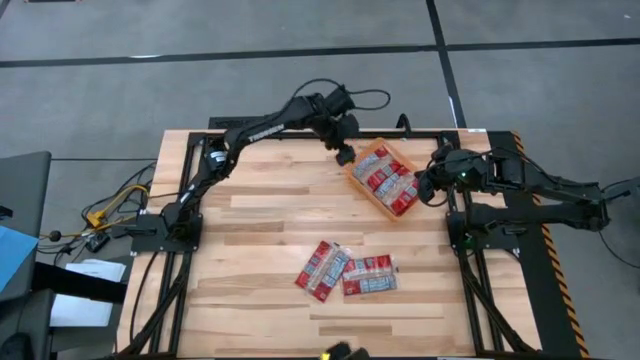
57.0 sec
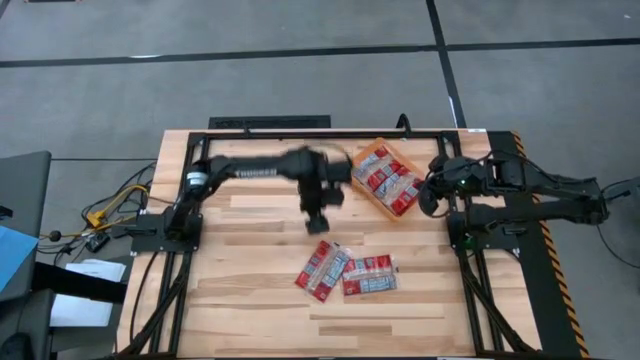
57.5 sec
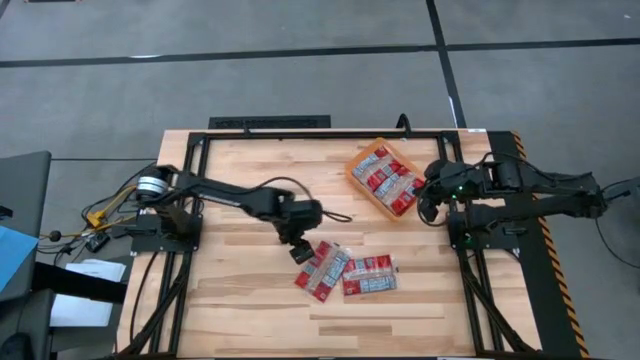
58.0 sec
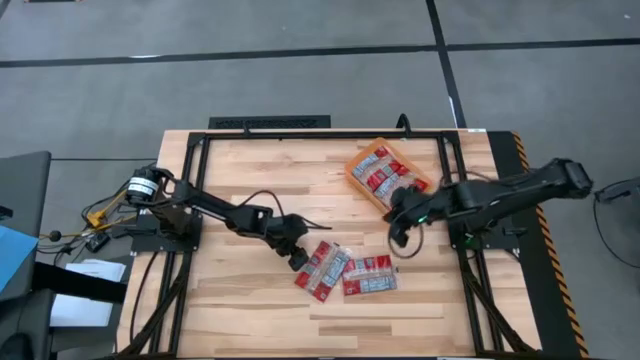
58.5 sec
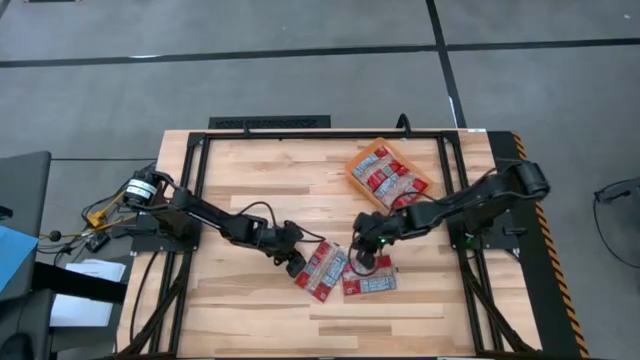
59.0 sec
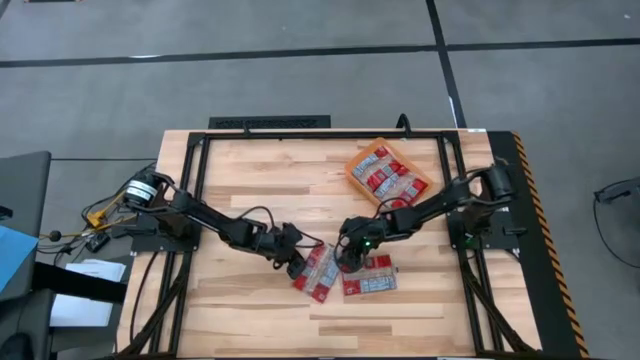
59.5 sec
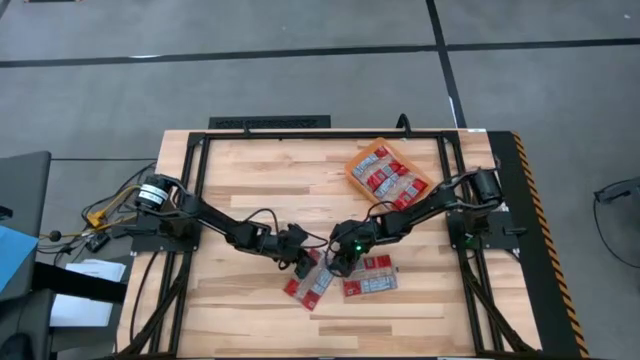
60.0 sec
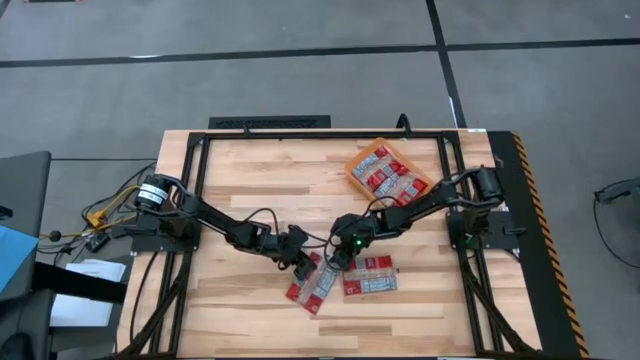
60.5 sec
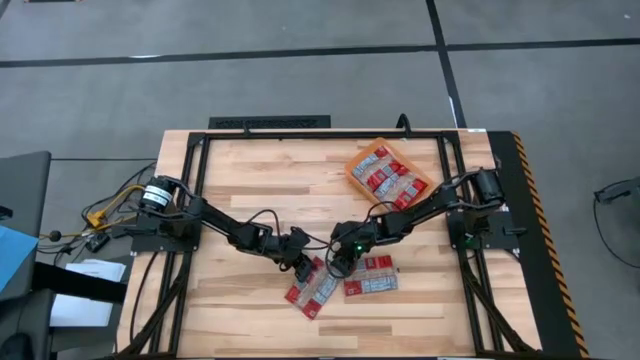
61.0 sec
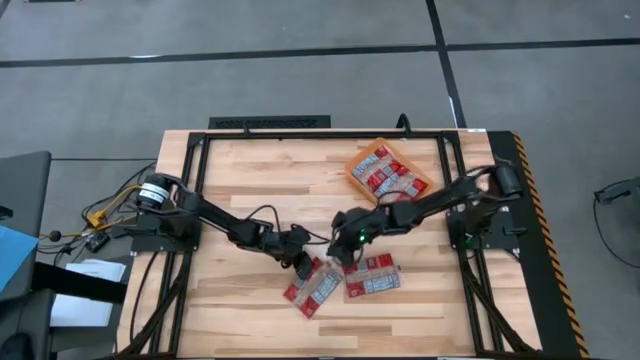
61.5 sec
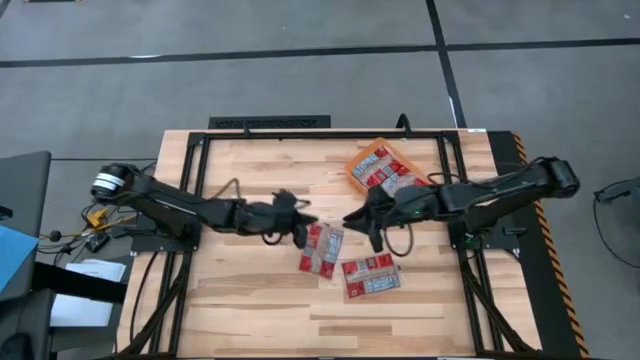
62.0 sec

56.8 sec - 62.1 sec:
Task: Sort popcorn bags into baskets
Put the popcorn bag into the orange transparent bin

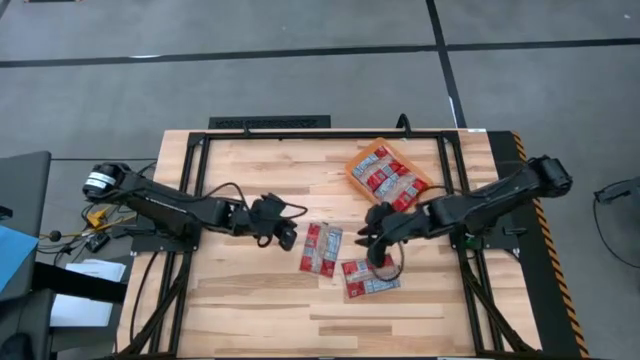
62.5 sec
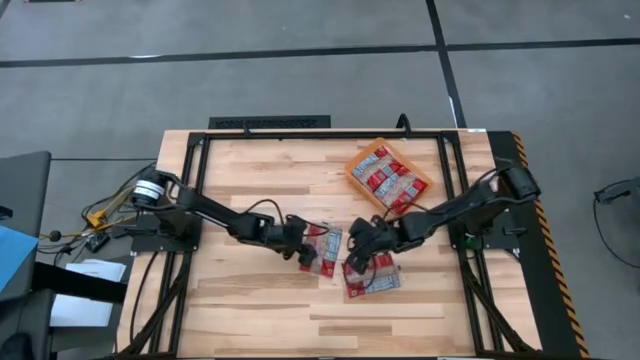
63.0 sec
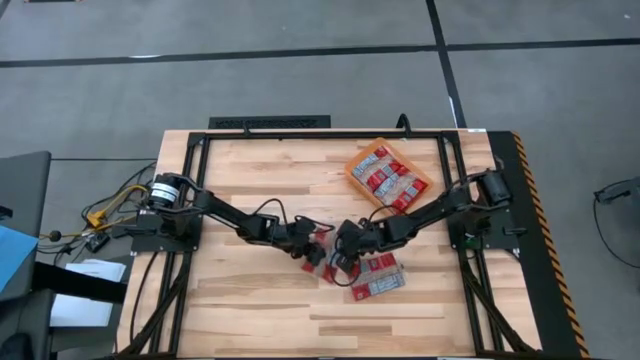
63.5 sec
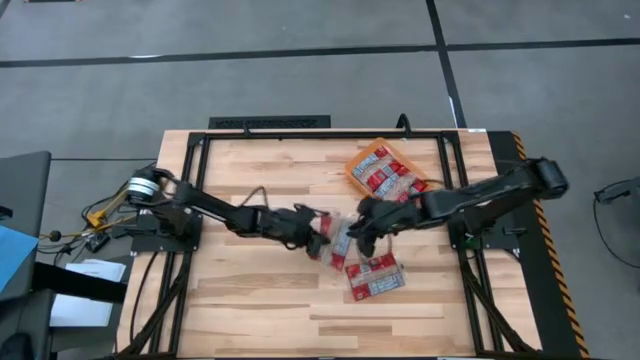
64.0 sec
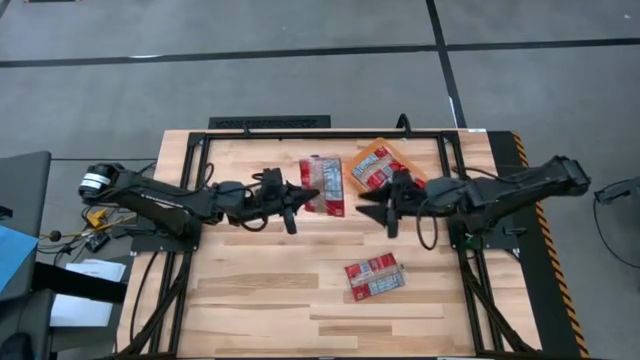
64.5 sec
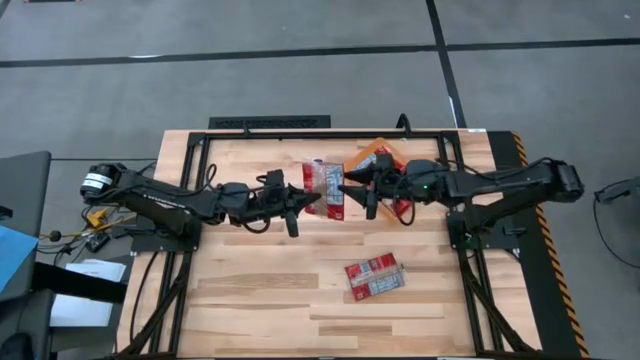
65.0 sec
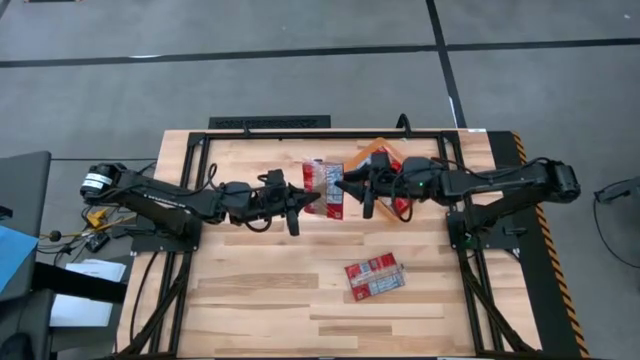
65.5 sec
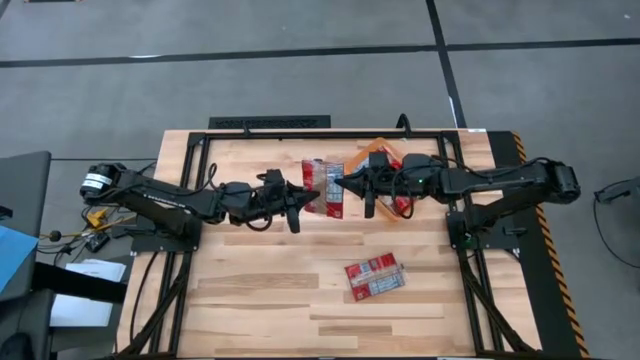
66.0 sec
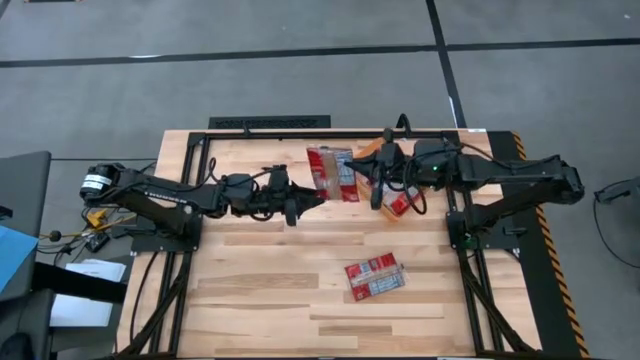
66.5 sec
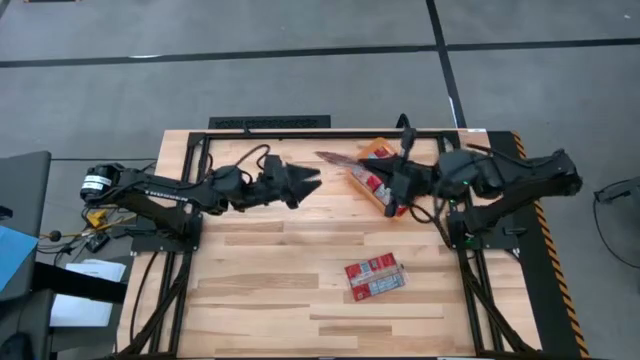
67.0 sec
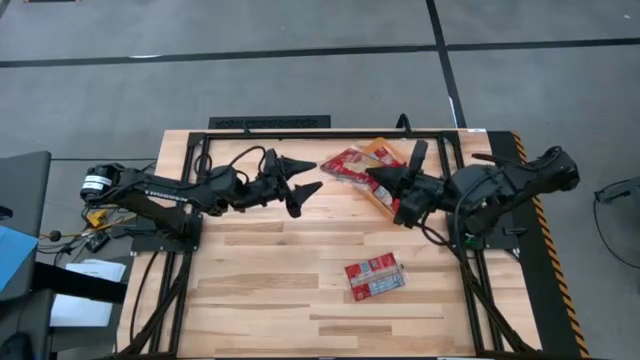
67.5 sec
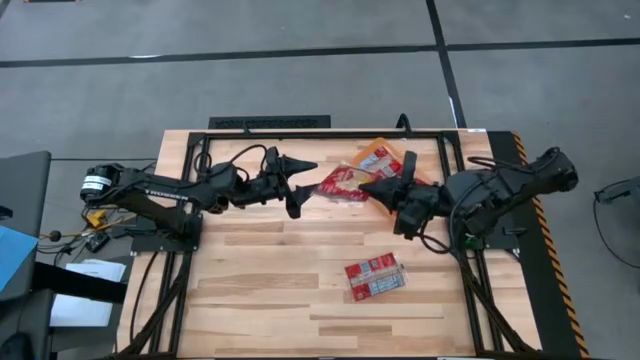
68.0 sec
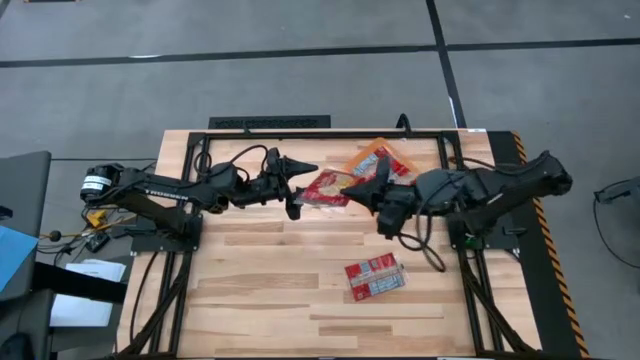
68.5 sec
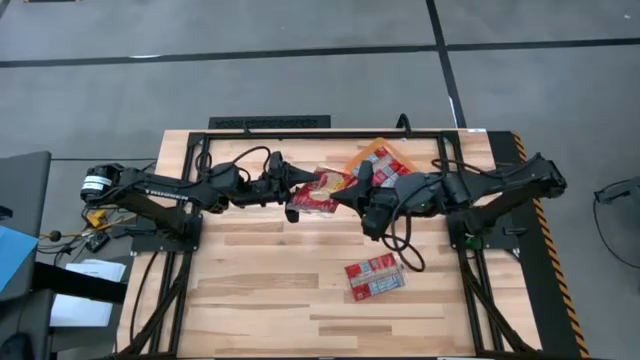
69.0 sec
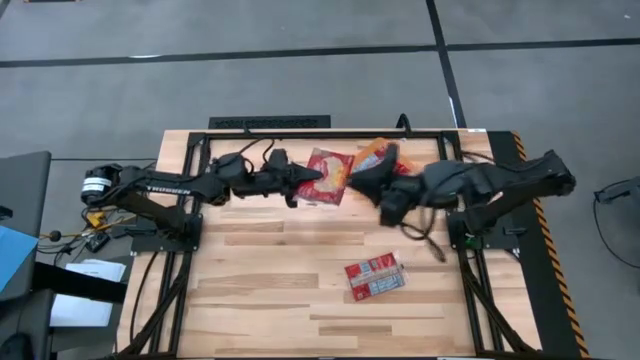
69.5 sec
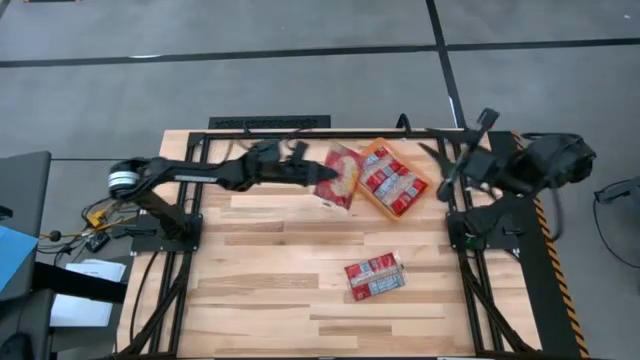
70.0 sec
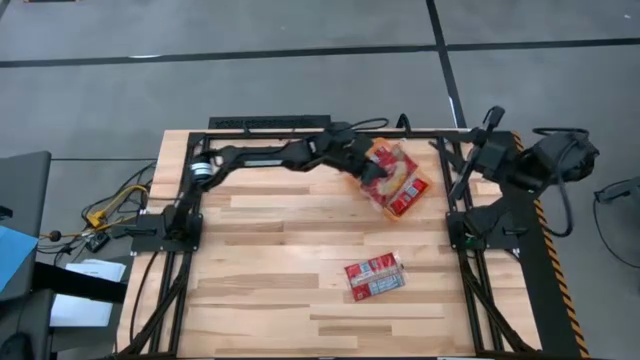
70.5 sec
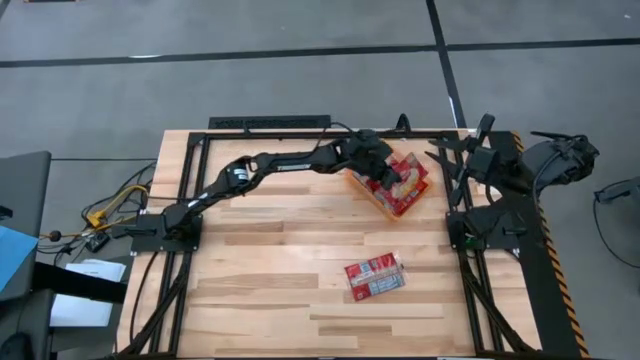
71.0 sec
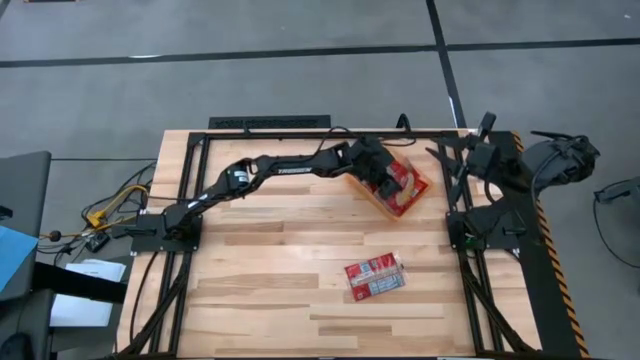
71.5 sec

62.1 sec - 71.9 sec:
Put the popcorn bag into the orange transparent bin

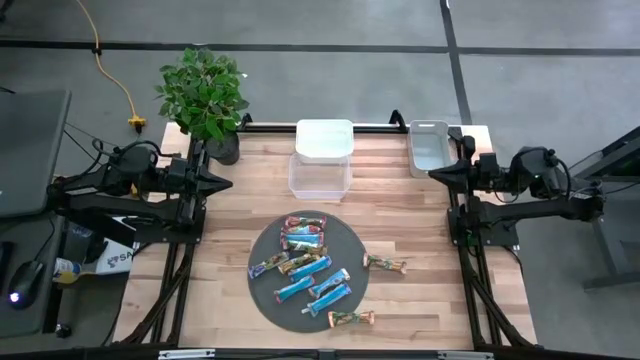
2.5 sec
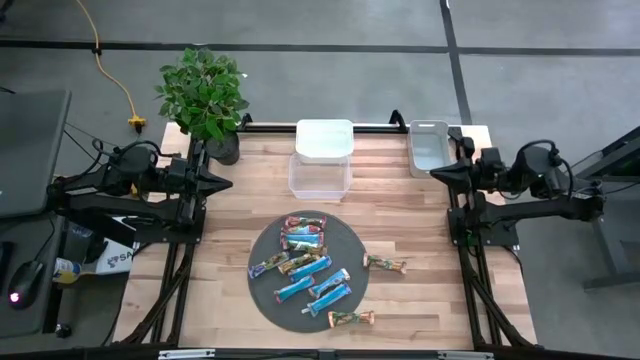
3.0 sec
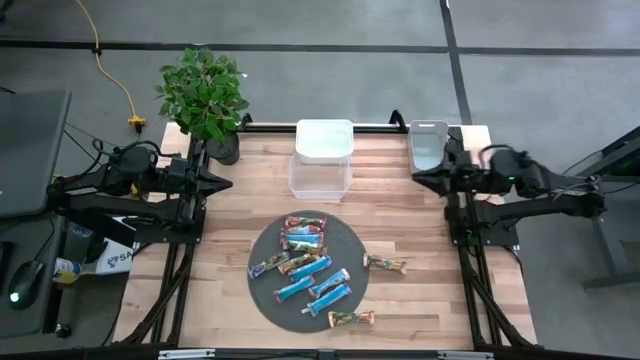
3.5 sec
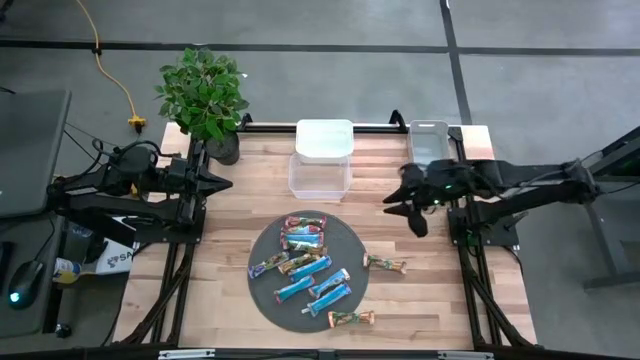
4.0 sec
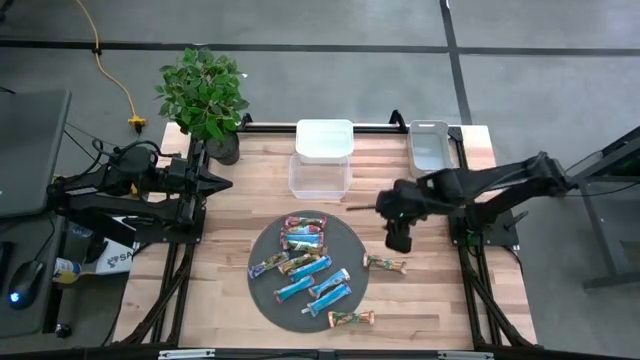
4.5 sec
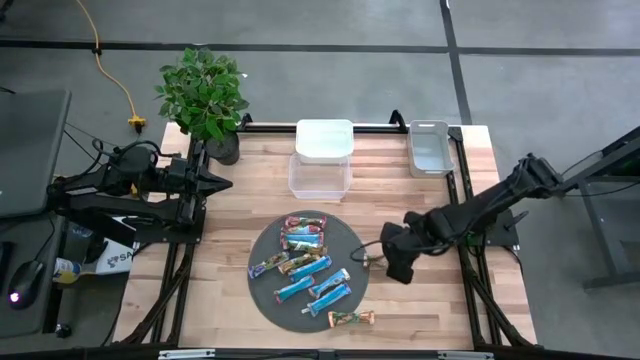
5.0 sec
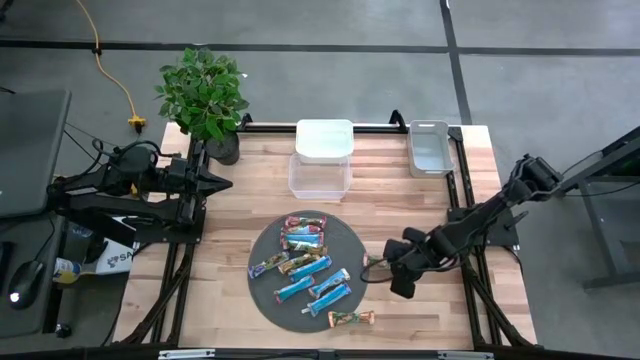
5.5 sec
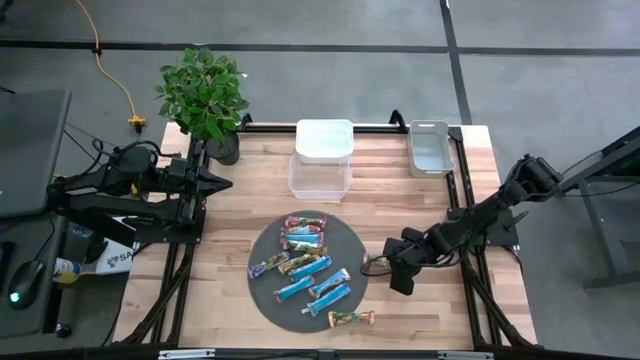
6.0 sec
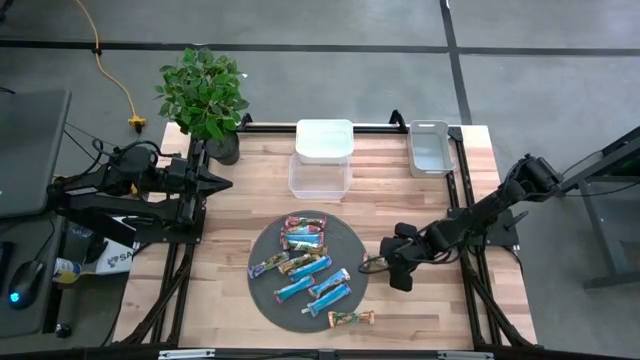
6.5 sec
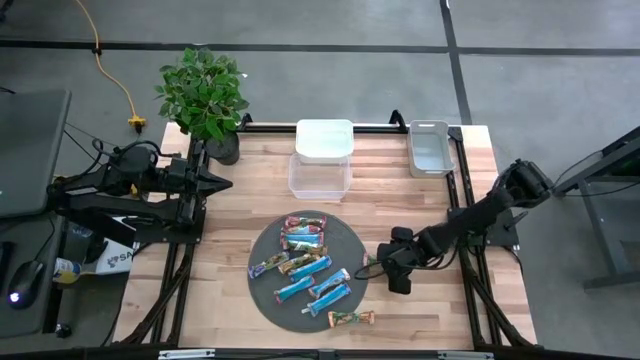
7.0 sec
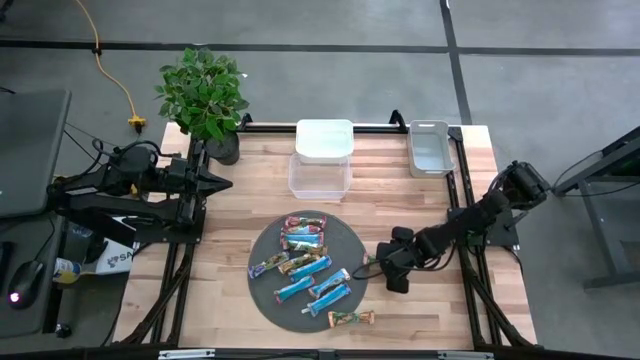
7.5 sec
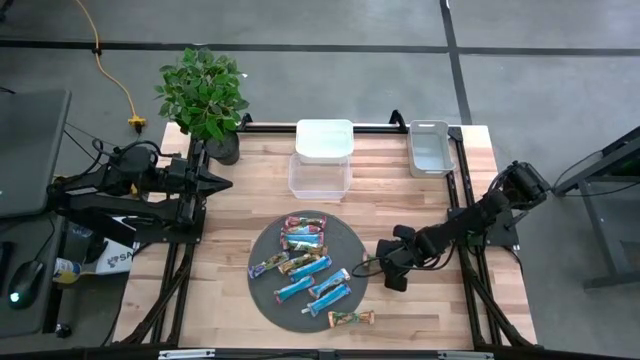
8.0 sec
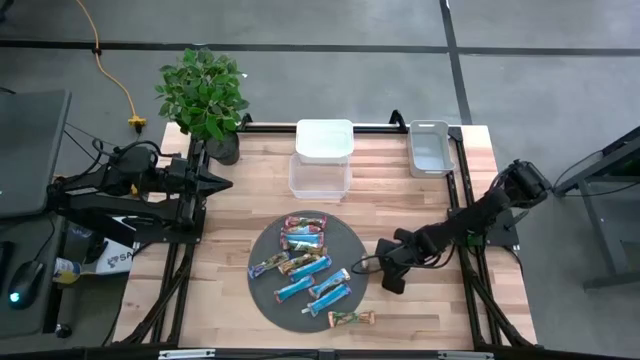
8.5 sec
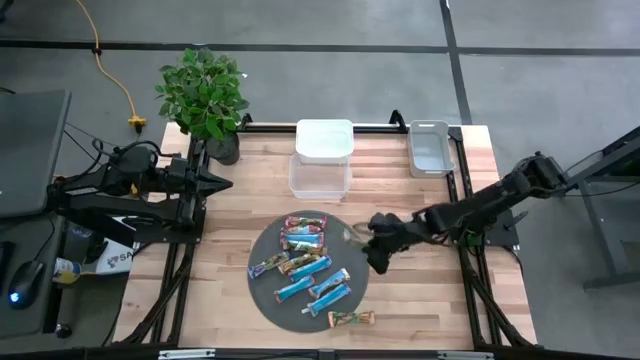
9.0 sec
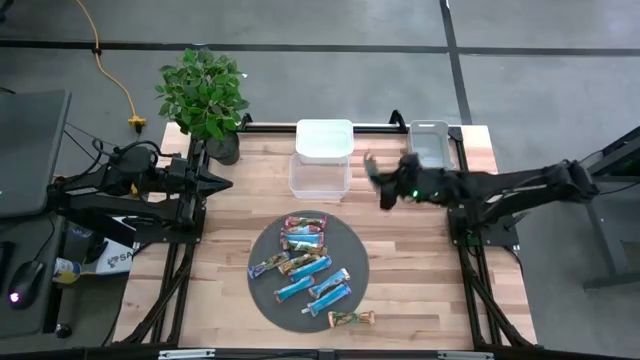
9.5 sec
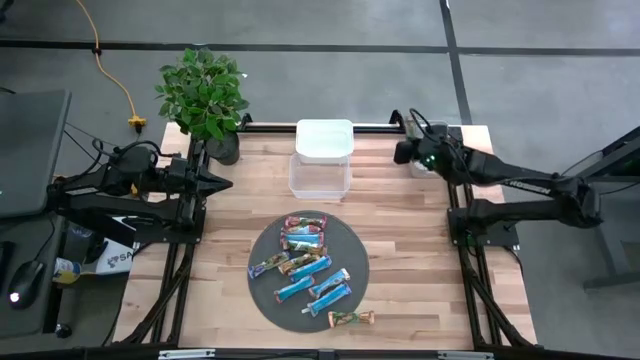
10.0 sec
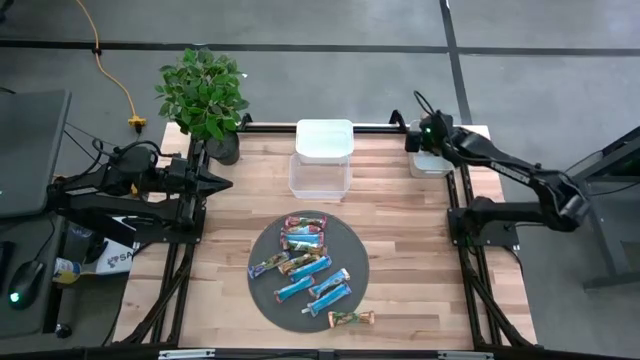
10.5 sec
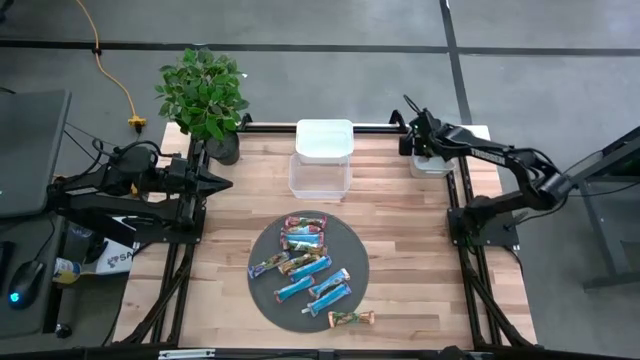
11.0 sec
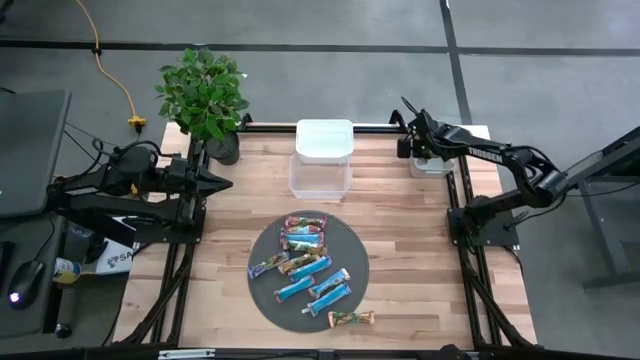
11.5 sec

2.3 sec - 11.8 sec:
Task: Pick and place Granola Bars by type
Put the yellow granola bar into the gray bin
